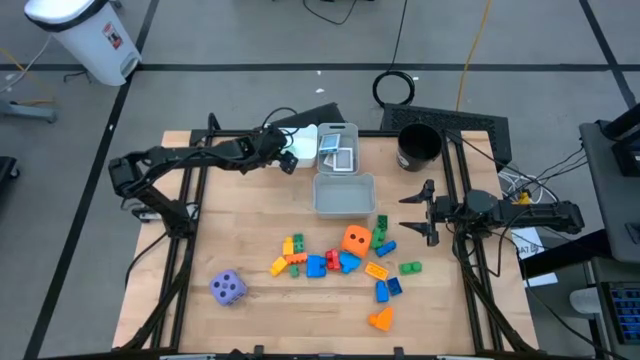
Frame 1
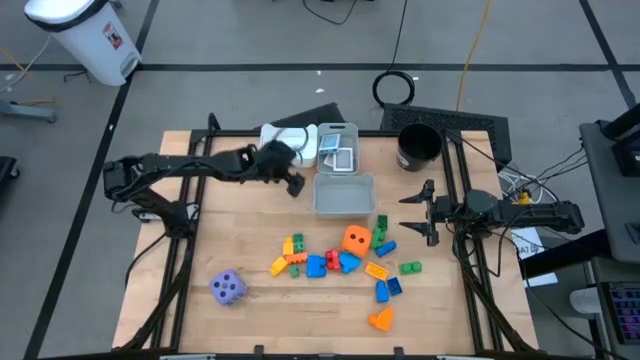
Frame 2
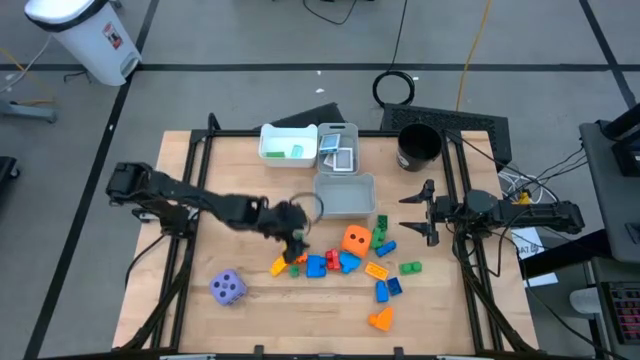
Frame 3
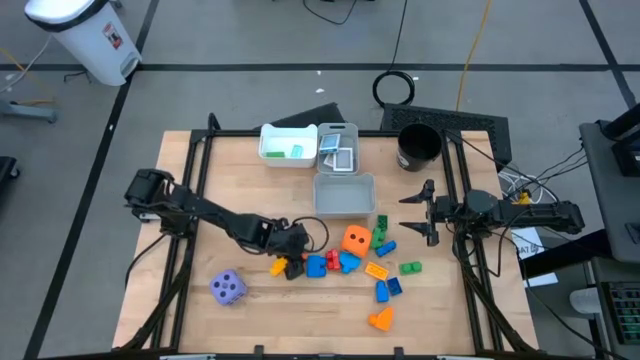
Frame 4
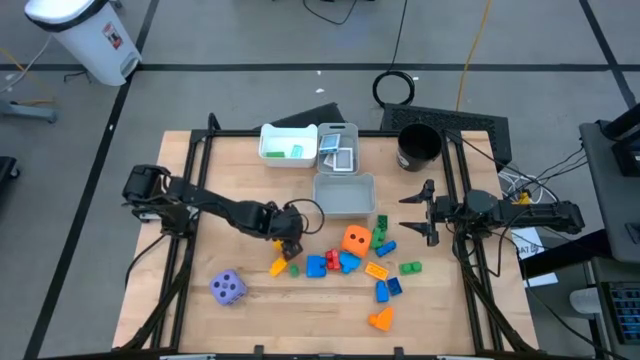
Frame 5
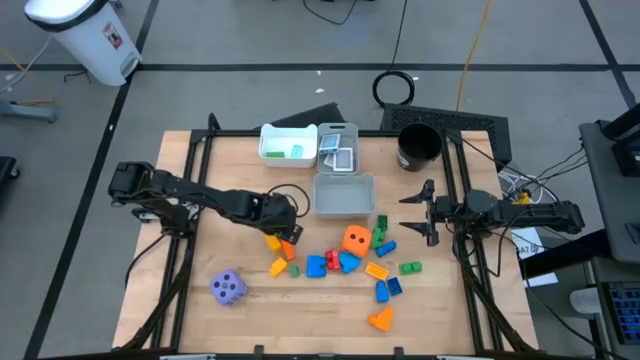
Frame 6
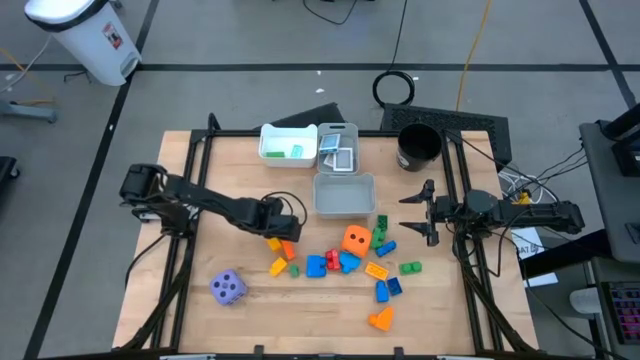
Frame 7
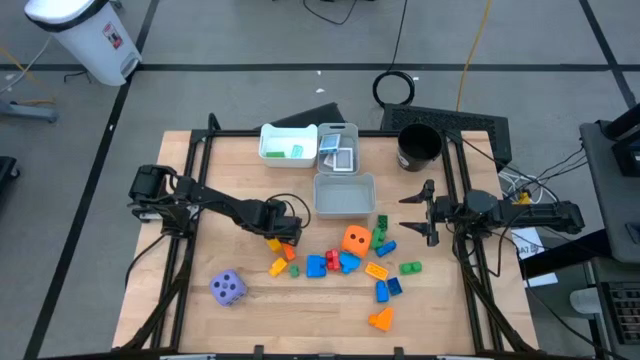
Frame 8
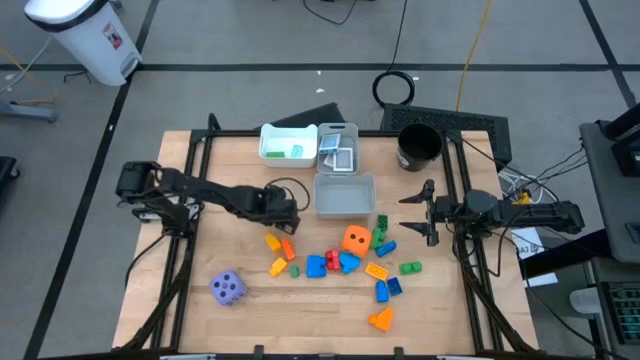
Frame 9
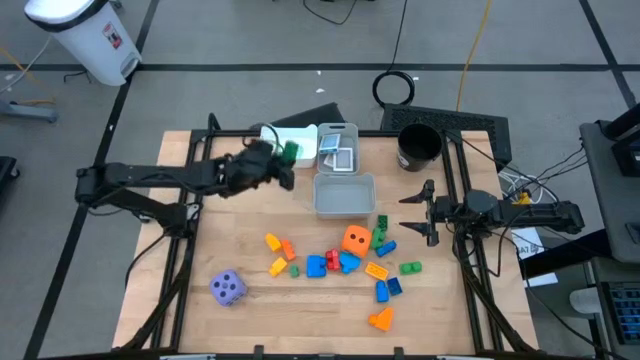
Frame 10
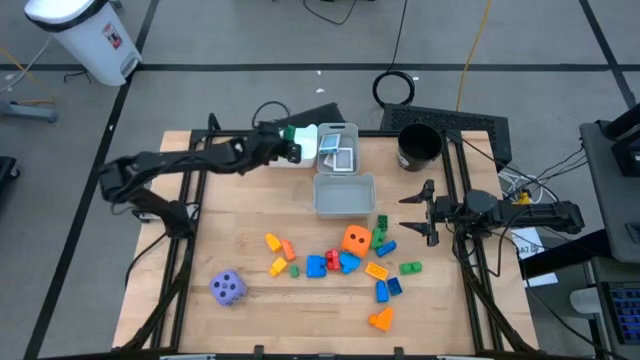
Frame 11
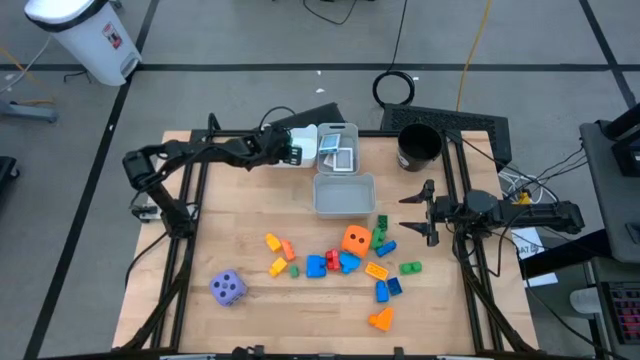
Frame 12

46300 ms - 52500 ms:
Task: Pick & Place Toys
Put the green game piece into the white bin

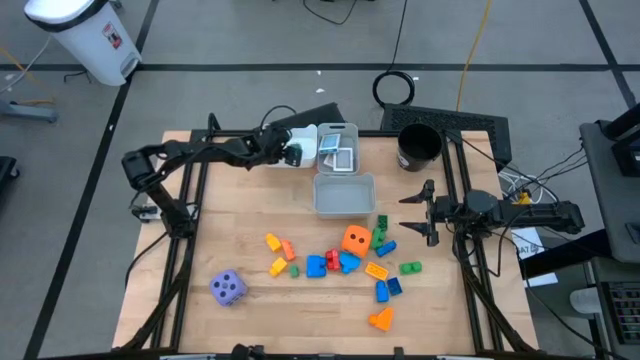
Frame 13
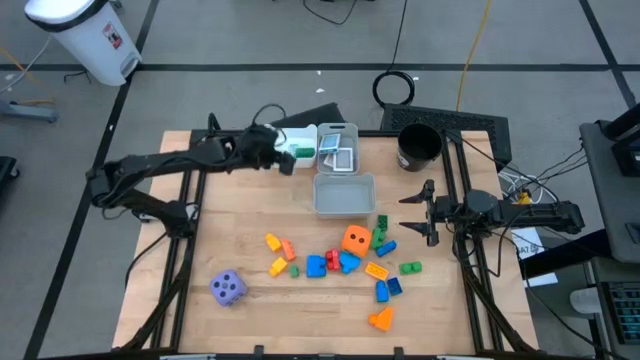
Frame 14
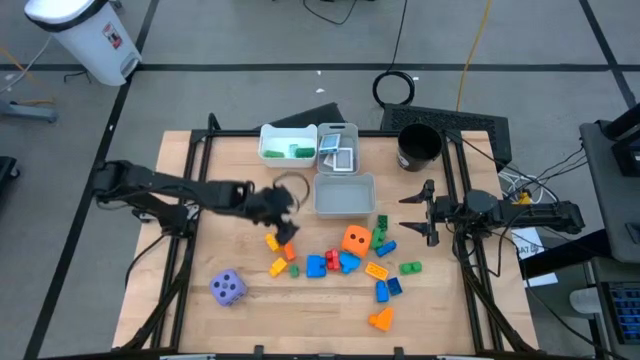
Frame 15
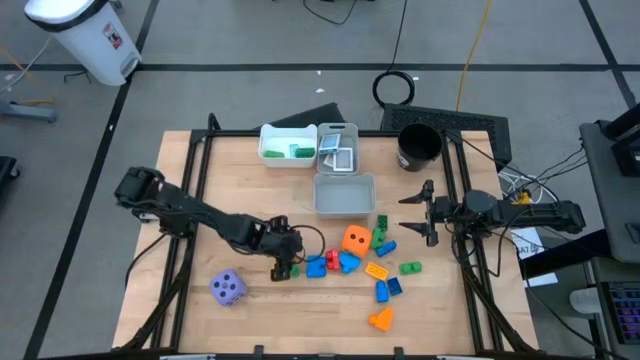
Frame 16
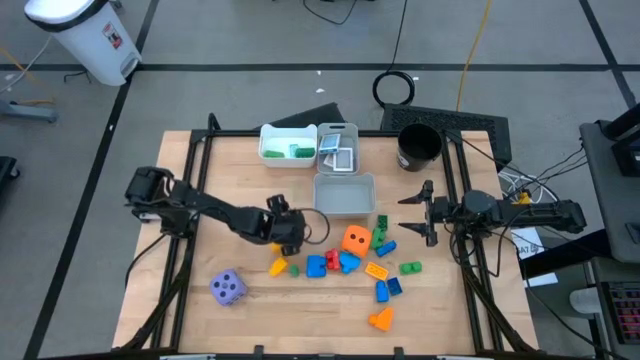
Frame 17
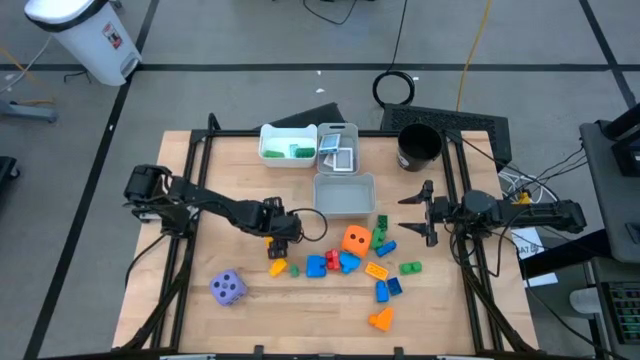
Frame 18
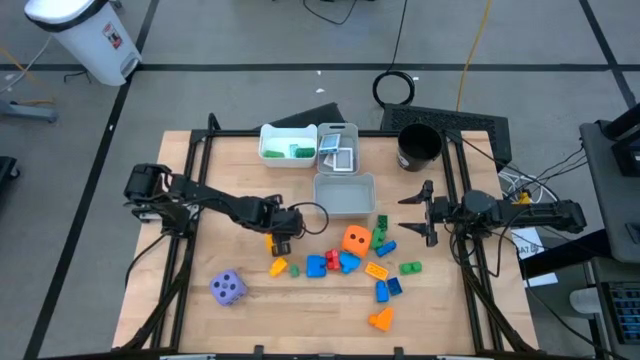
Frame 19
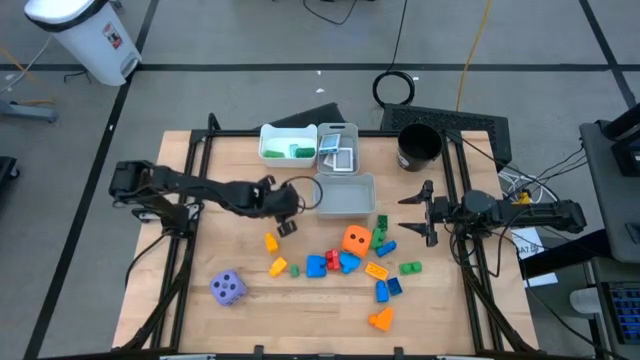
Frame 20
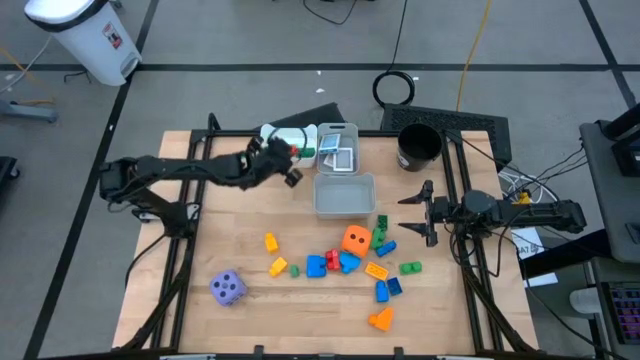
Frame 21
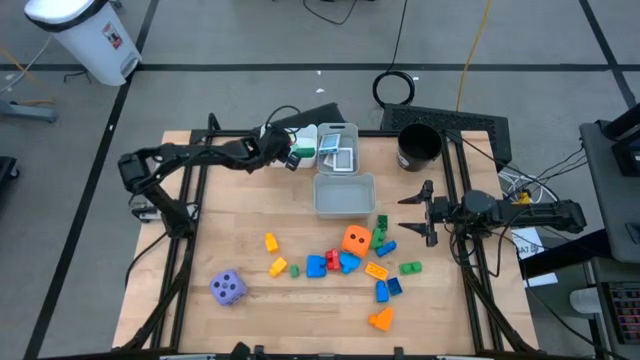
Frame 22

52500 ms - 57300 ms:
Put the orange game piece into the white bin

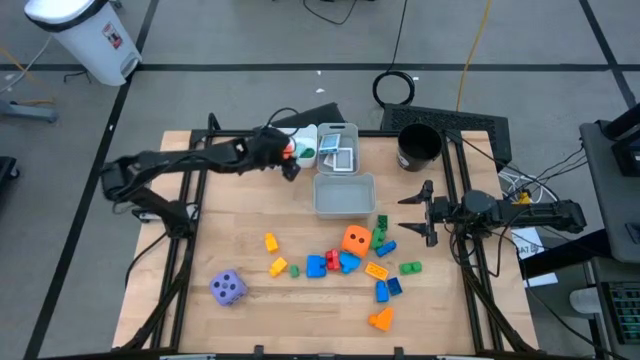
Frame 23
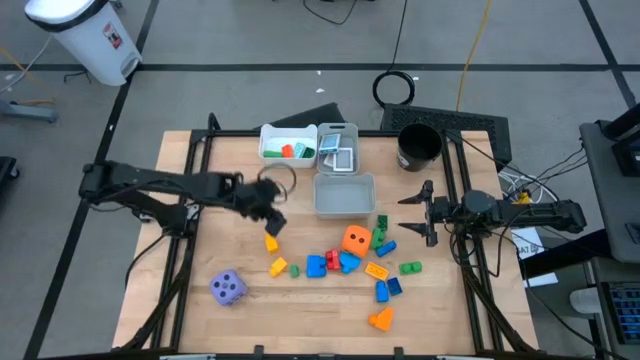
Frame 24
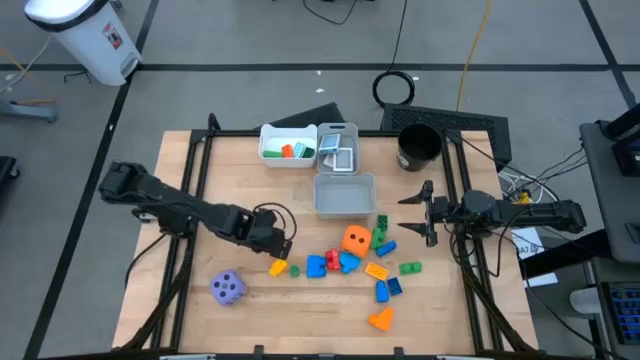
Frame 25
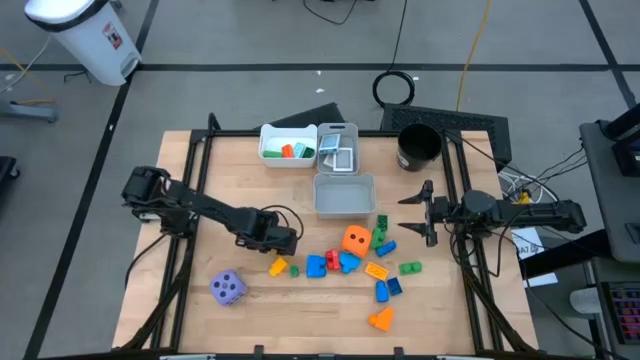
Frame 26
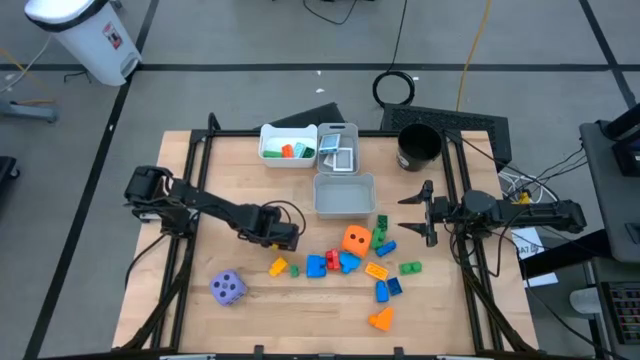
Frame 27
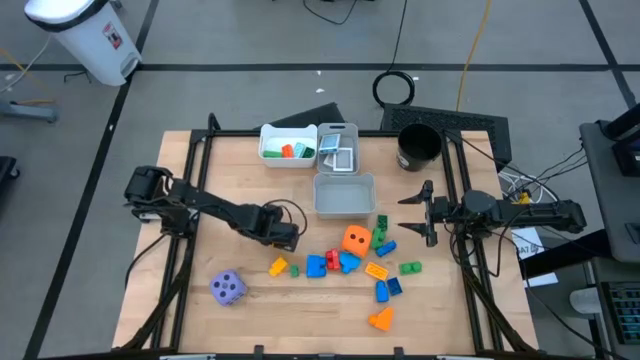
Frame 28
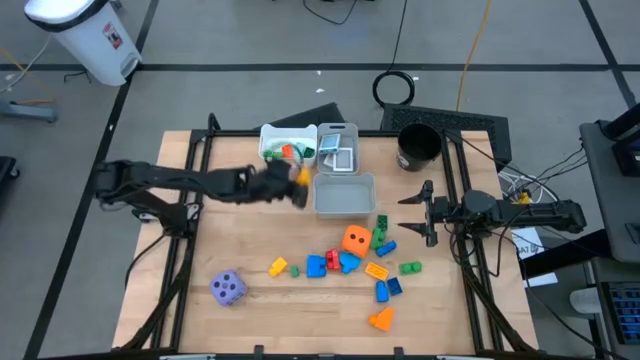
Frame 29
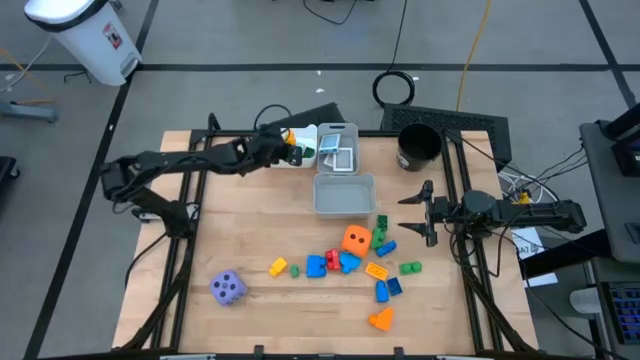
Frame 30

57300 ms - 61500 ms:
Put the yellow game piece into the white bin

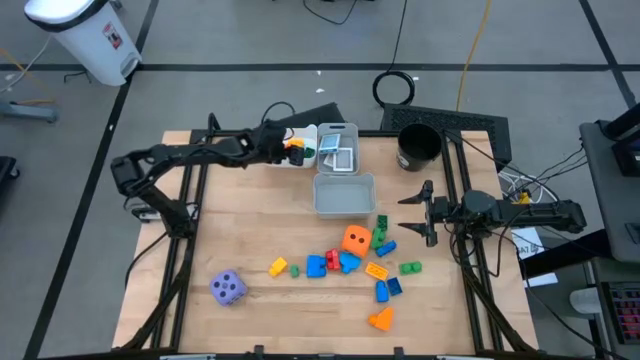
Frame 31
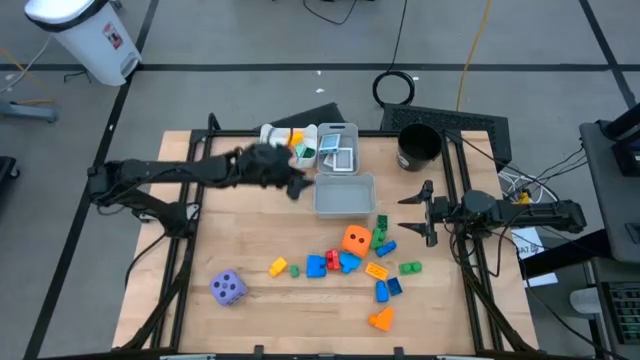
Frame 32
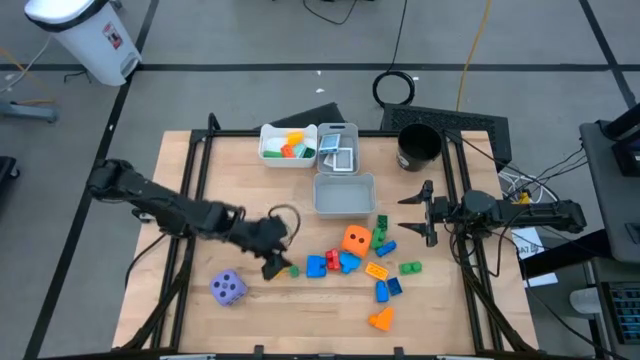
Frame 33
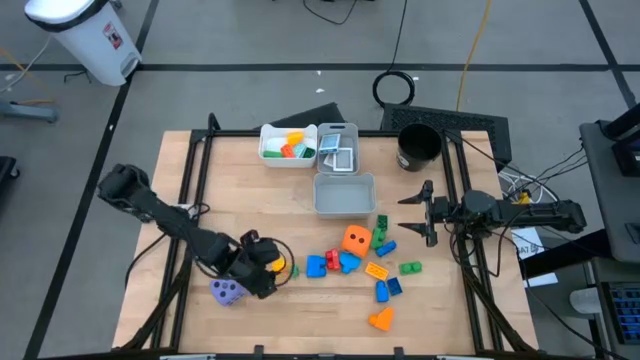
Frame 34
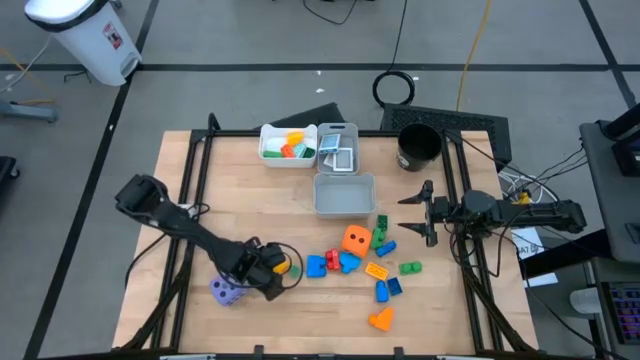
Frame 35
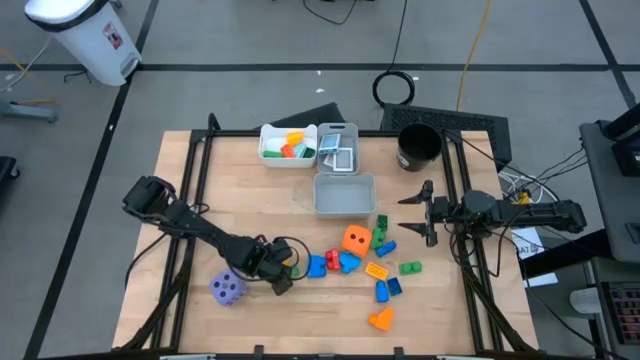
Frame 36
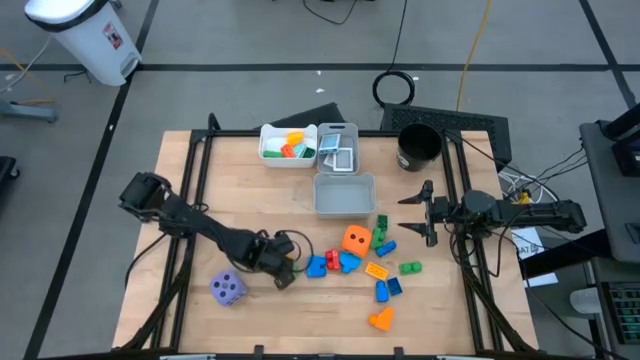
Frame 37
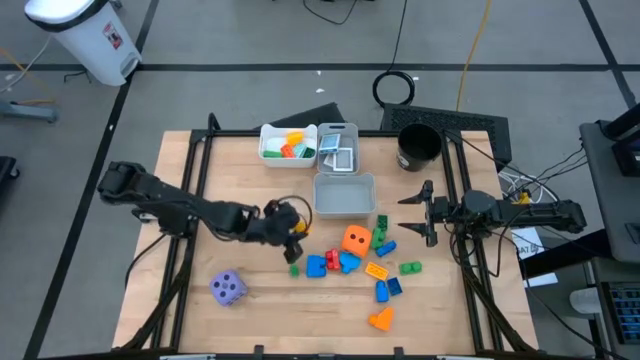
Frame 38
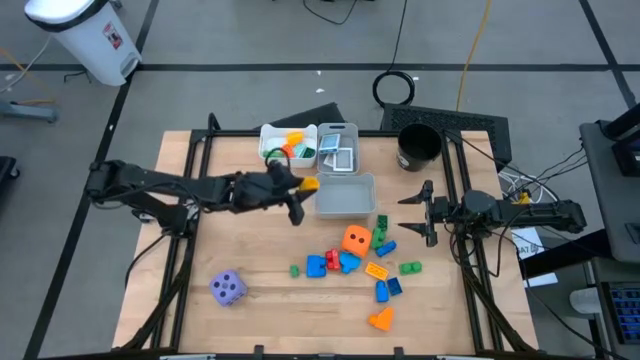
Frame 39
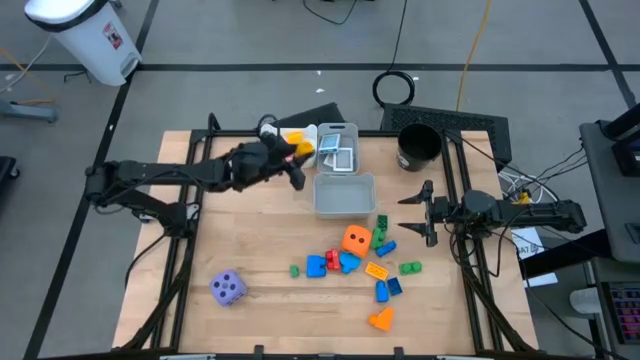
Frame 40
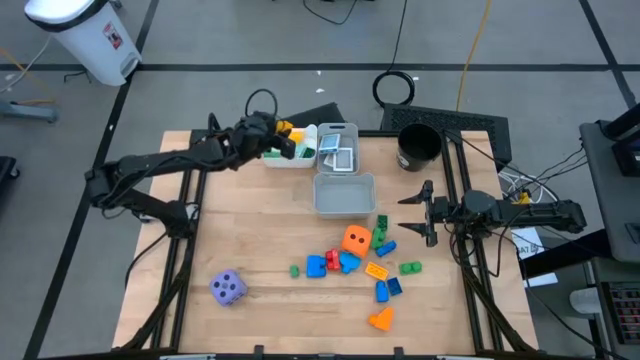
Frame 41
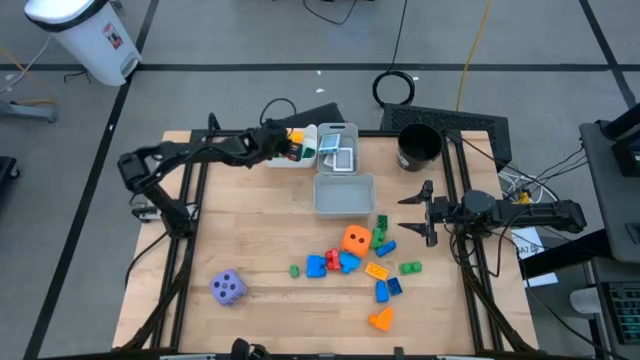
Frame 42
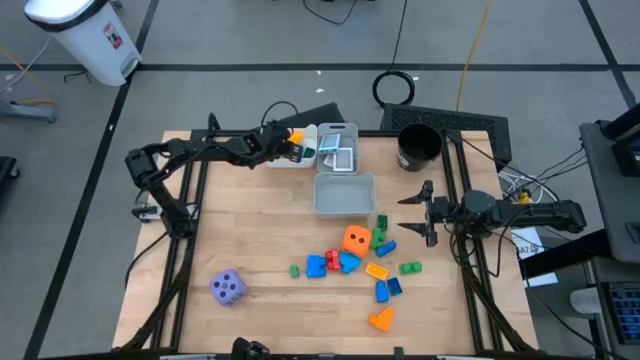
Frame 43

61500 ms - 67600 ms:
Put the yellow game piece into the white bin
